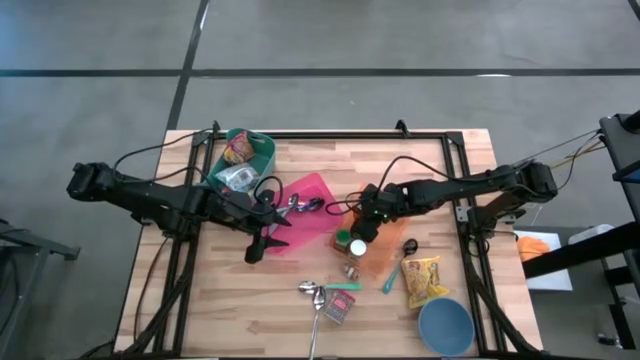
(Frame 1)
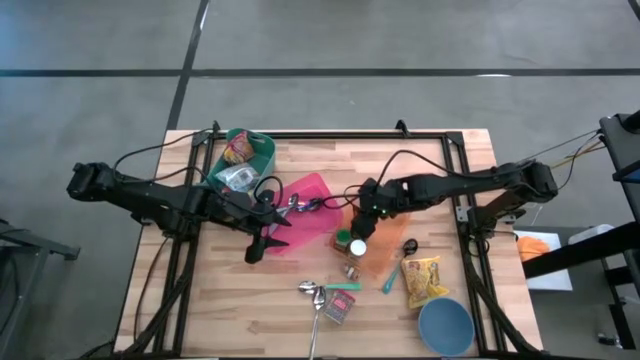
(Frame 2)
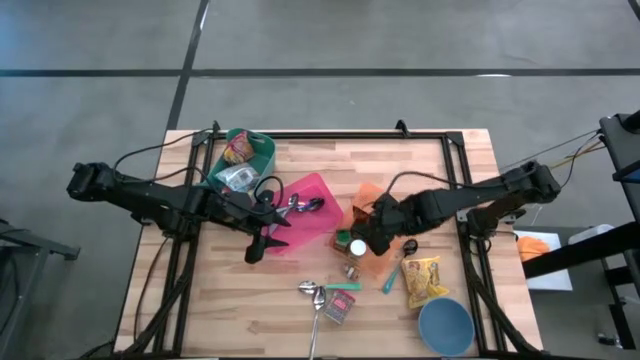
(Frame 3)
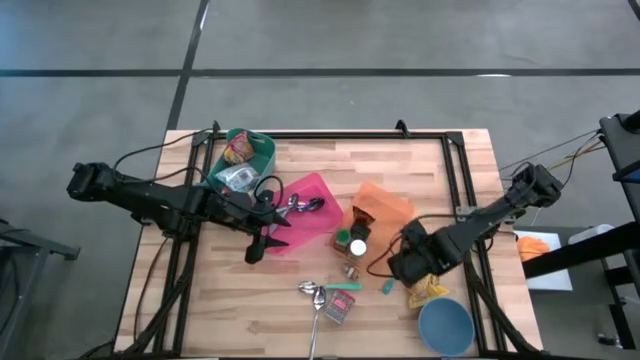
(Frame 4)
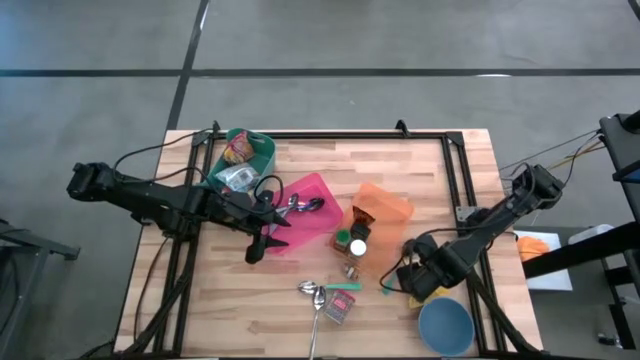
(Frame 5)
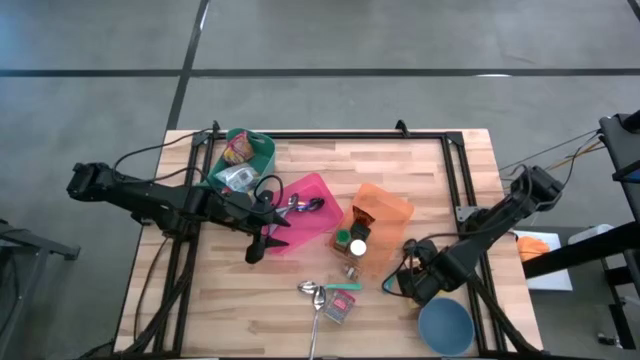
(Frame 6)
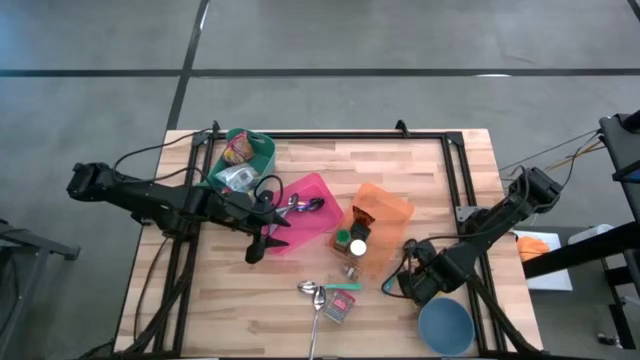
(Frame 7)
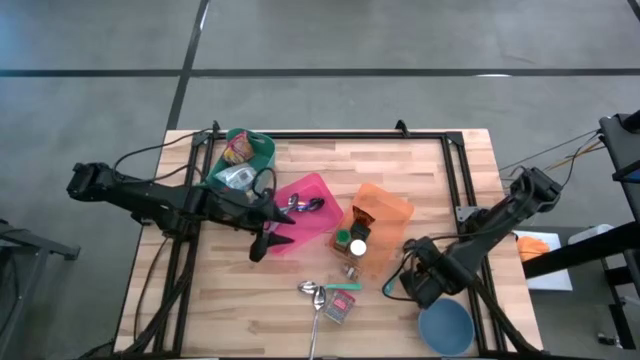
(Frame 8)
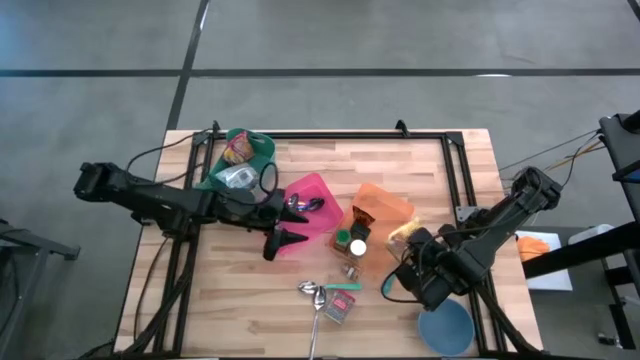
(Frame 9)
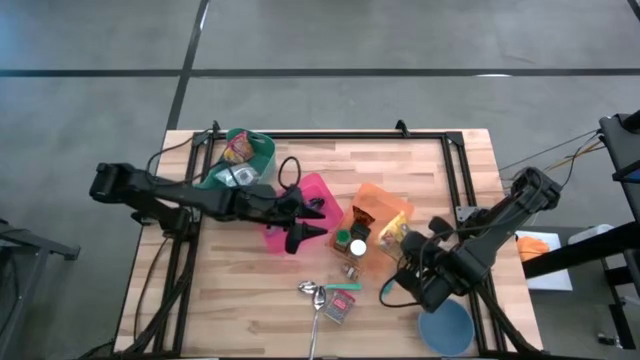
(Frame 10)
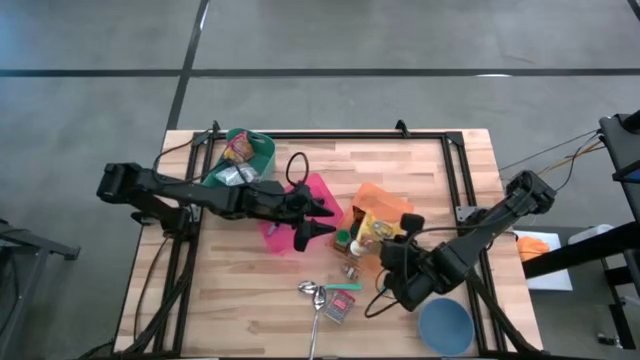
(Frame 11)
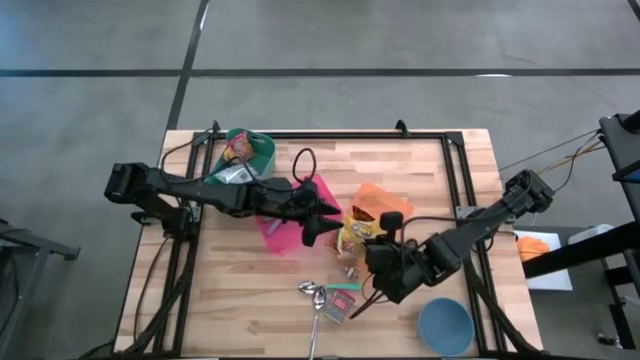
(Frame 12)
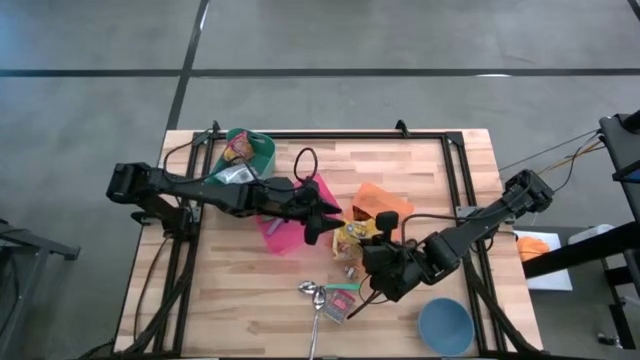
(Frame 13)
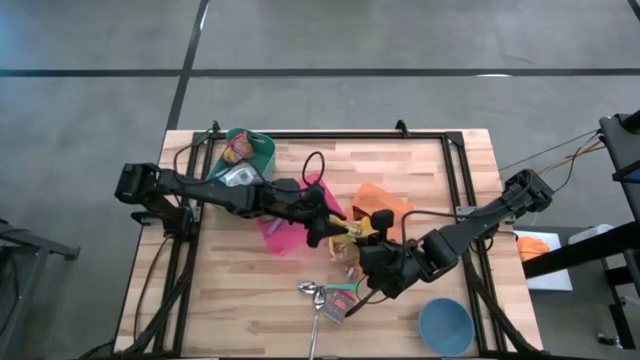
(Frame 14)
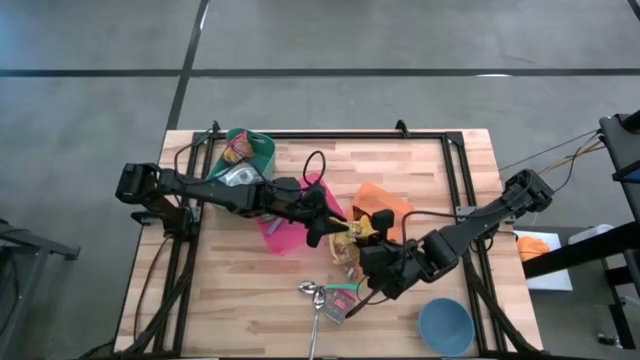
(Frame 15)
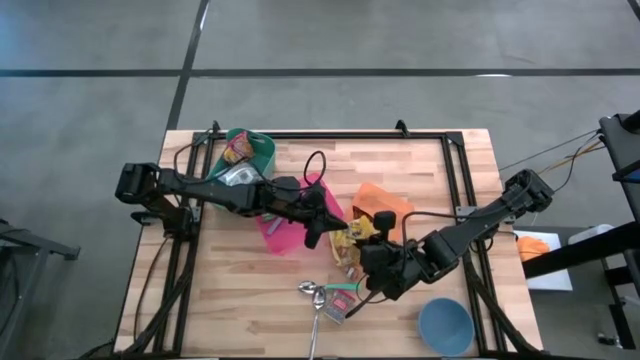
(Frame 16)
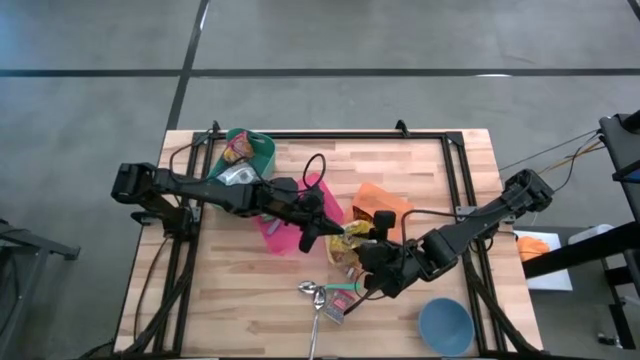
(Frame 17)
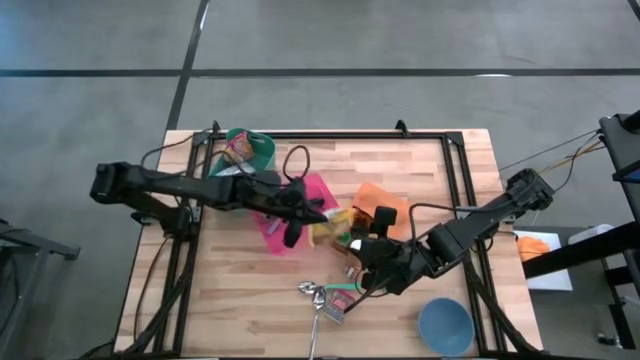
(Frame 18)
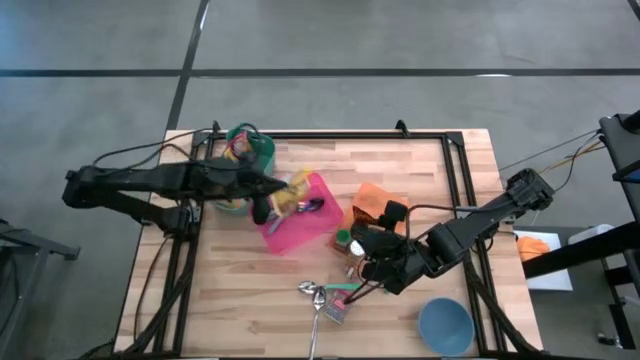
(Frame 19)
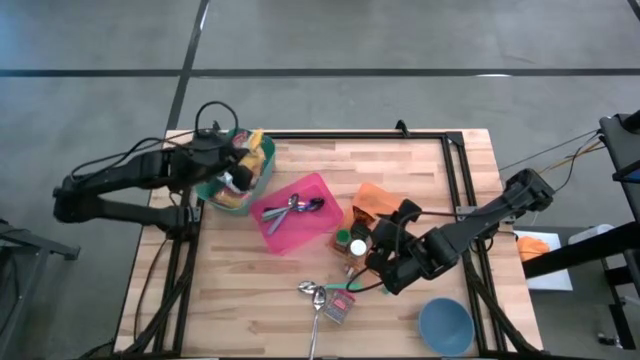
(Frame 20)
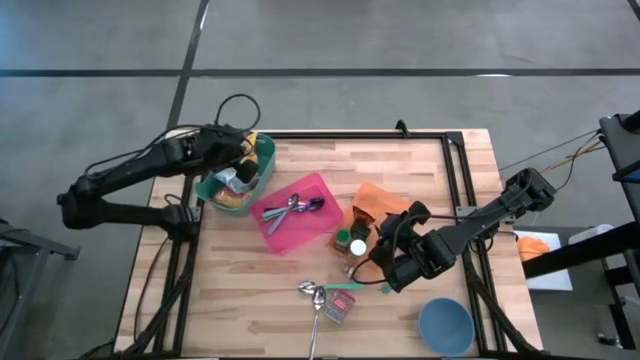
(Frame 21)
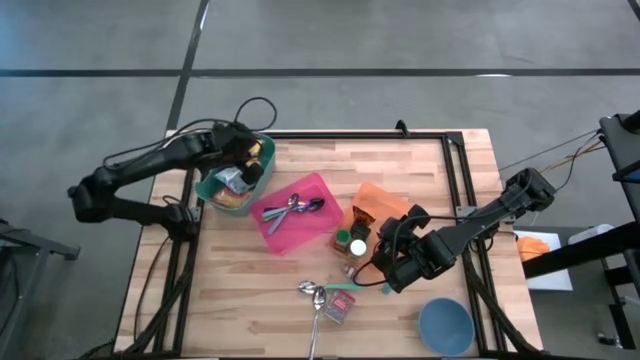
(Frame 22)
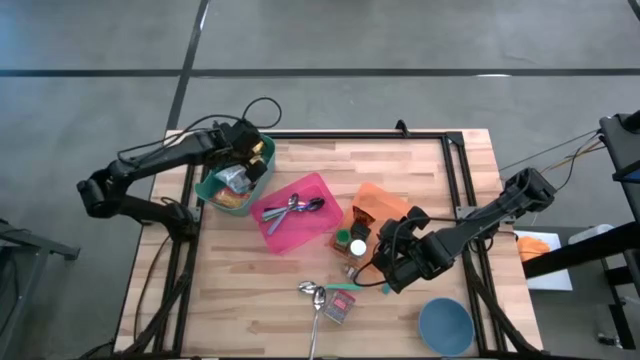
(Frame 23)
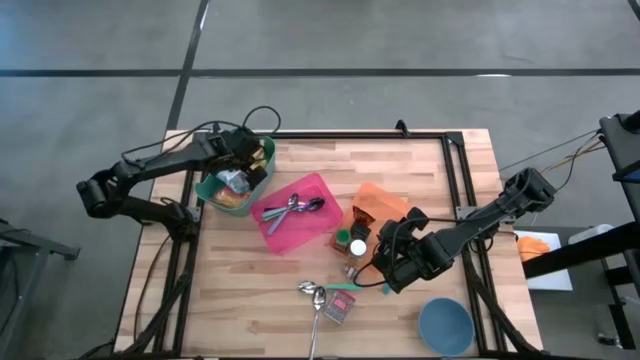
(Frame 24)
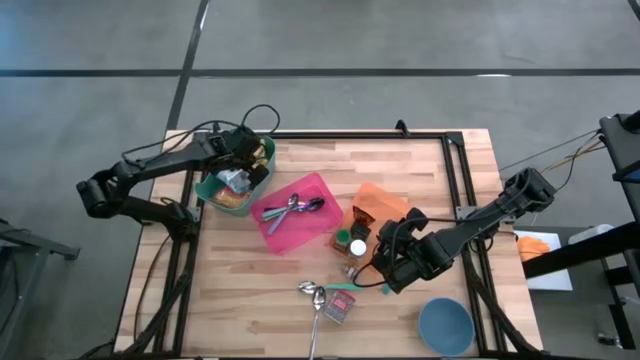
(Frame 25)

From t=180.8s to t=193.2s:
Put the yellow noodle pack into the green bin

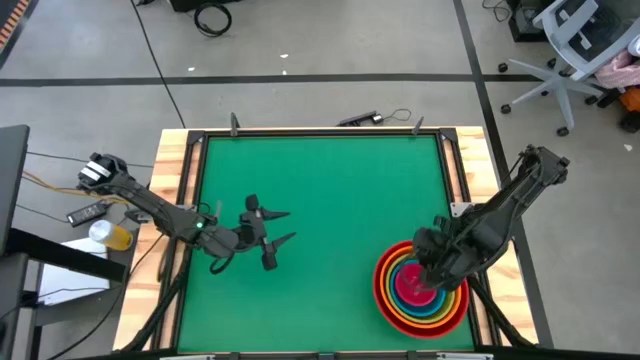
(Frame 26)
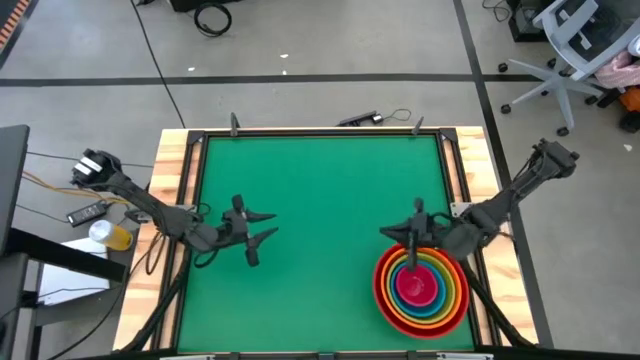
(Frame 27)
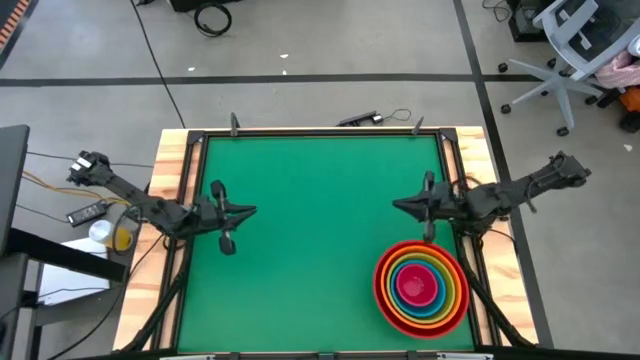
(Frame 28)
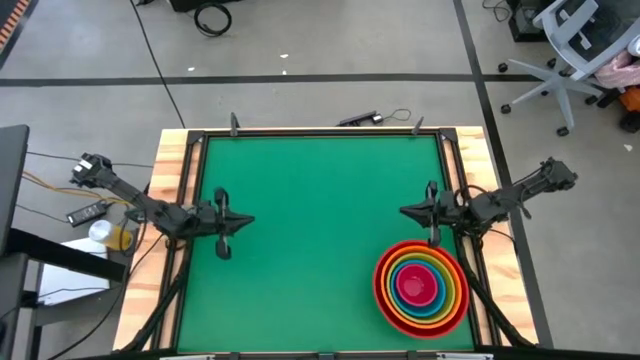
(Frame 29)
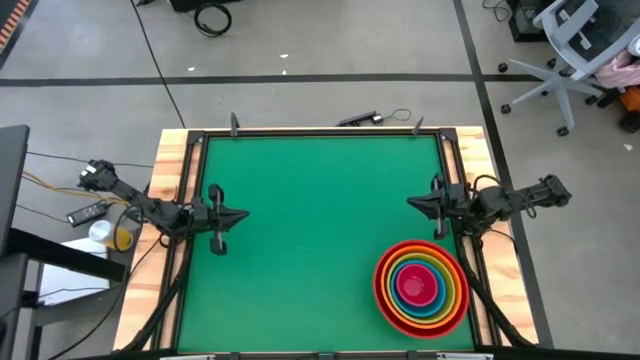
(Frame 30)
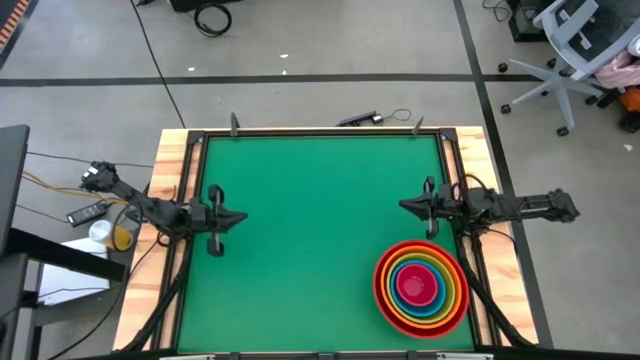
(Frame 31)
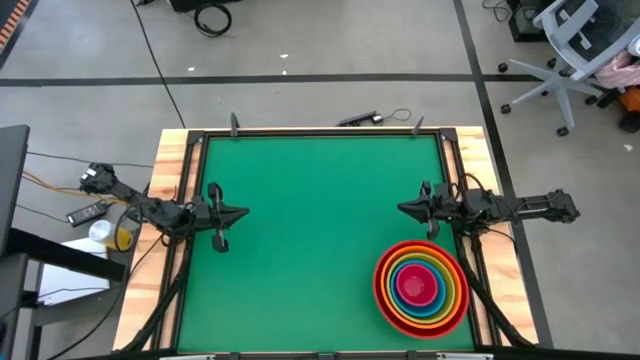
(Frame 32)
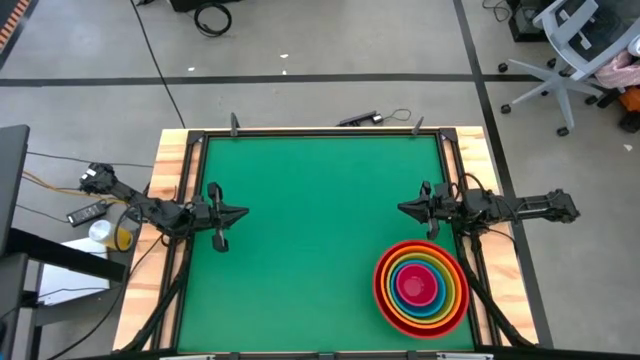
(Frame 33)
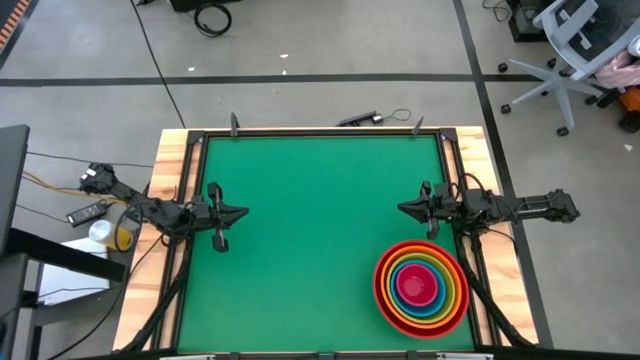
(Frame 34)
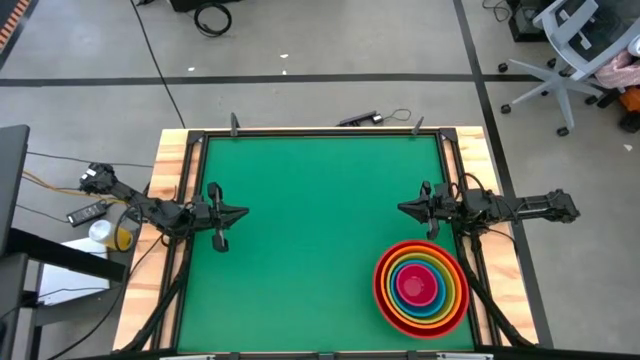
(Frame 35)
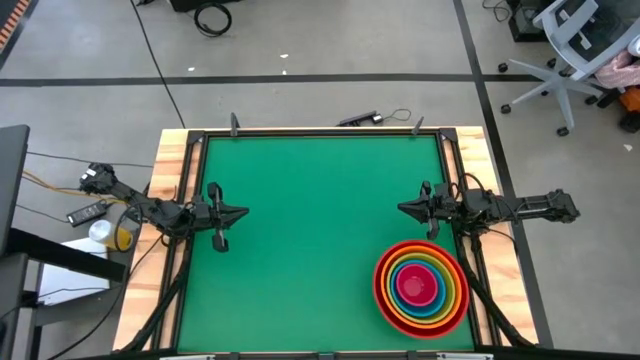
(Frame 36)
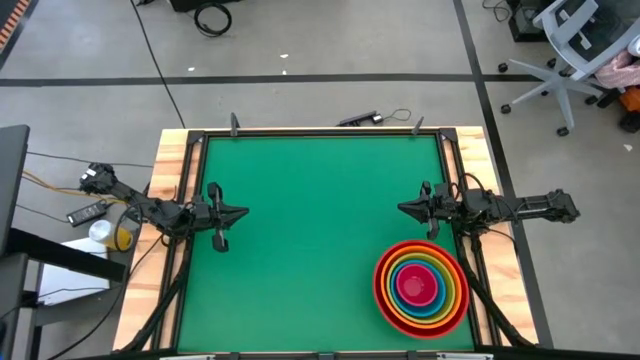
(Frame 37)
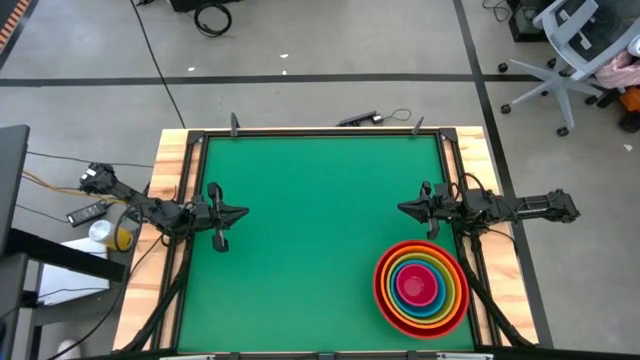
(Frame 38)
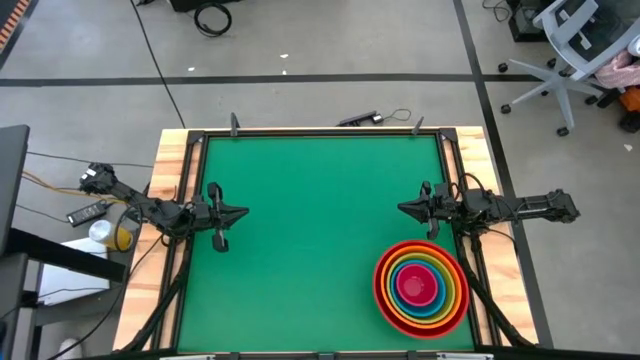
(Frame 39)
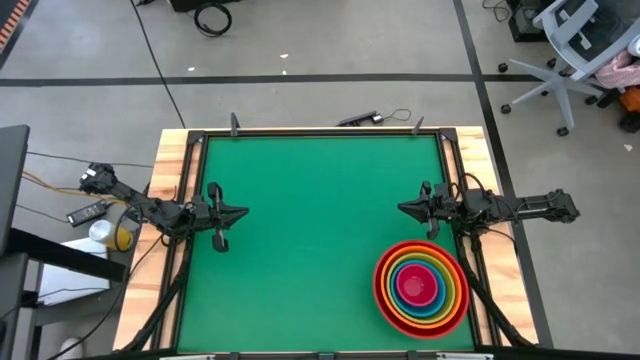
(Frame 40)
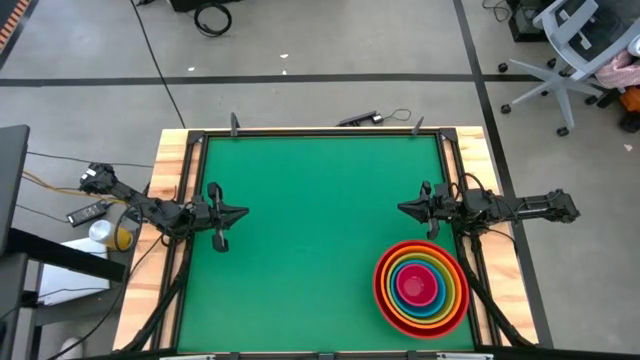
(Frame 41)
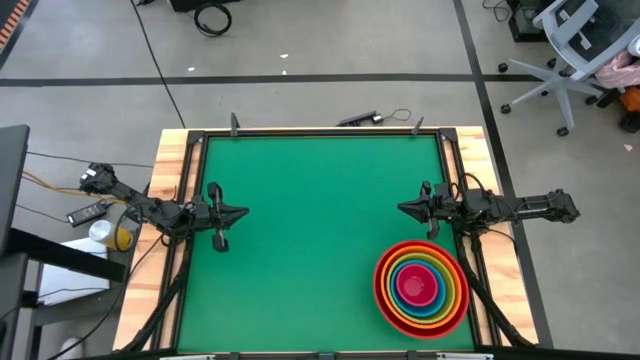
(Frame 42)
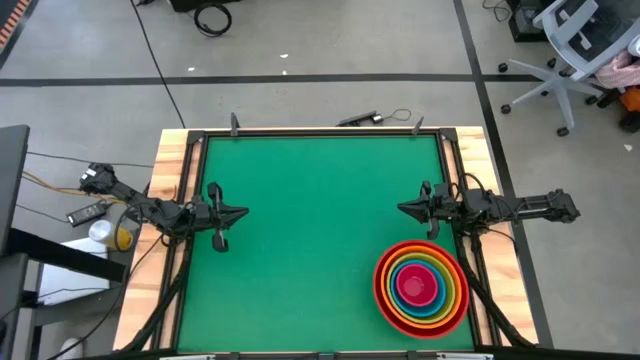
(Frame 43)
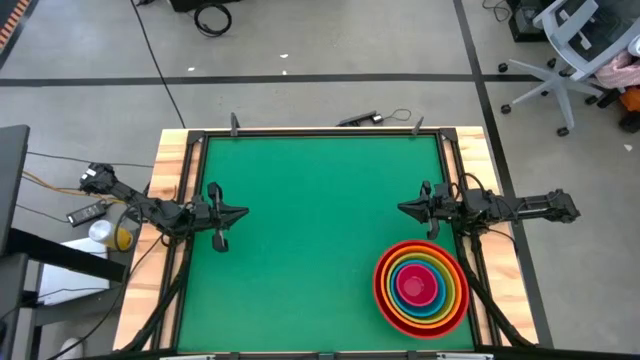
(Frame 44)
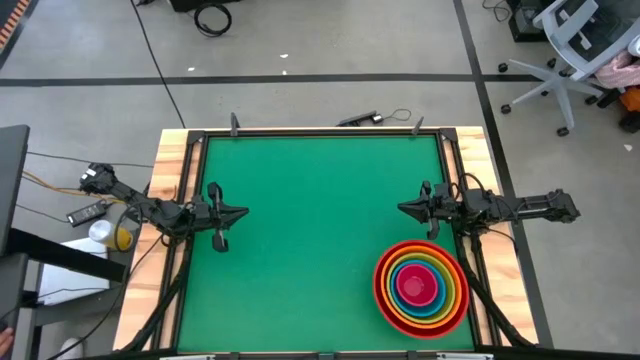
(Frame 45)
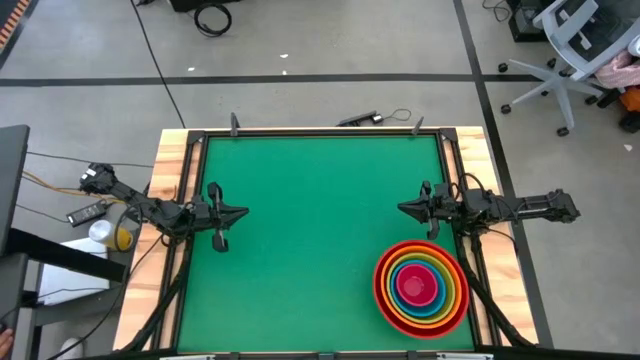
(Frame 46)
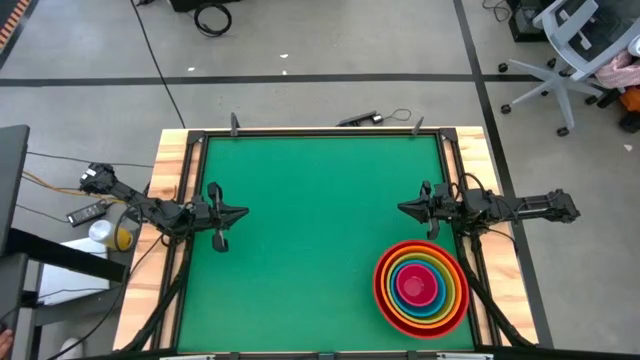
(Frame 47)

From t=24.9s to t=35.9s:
Return to Home Position
